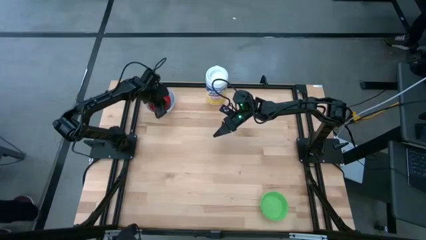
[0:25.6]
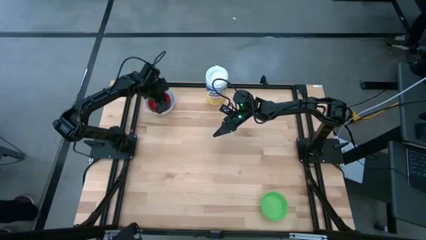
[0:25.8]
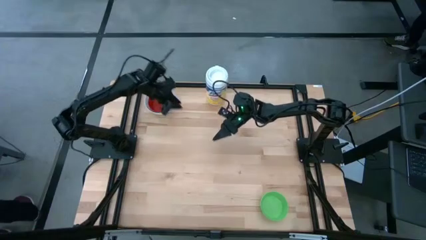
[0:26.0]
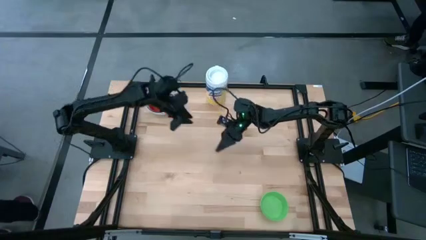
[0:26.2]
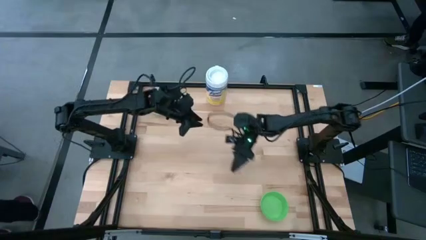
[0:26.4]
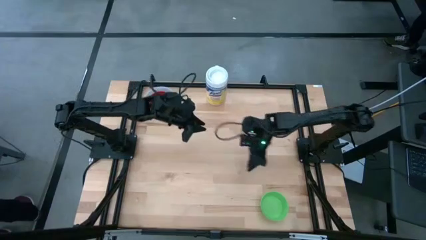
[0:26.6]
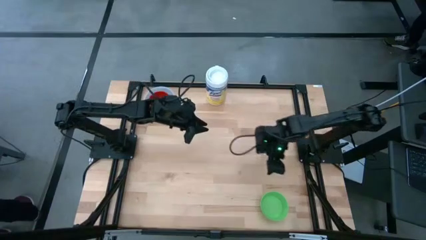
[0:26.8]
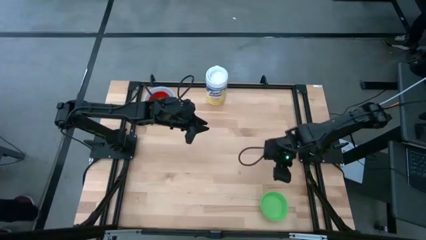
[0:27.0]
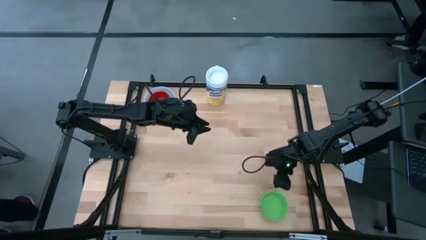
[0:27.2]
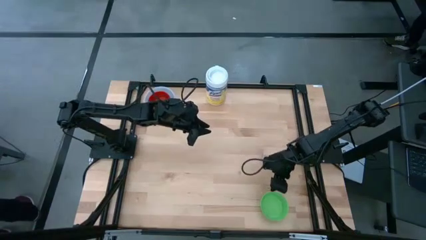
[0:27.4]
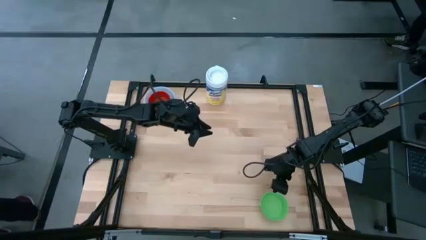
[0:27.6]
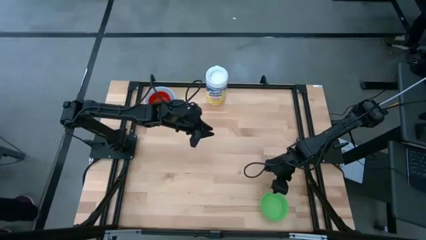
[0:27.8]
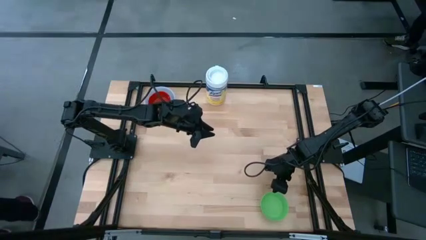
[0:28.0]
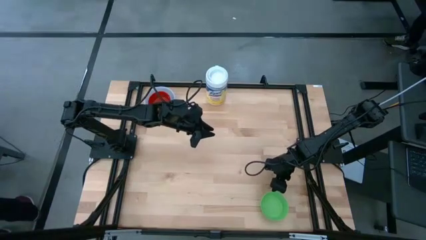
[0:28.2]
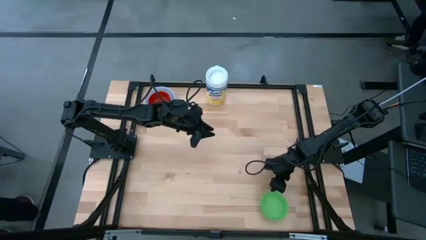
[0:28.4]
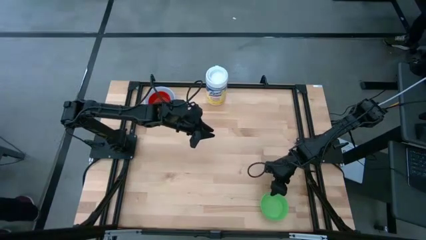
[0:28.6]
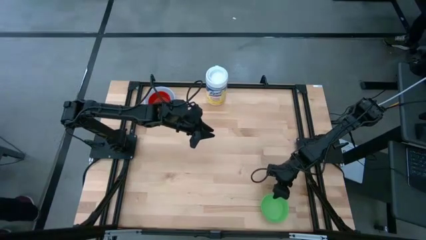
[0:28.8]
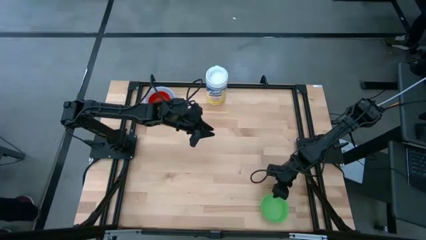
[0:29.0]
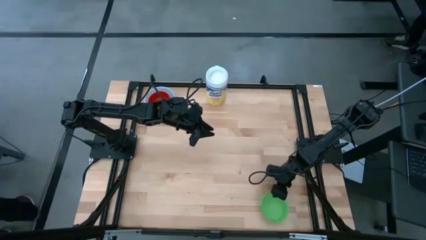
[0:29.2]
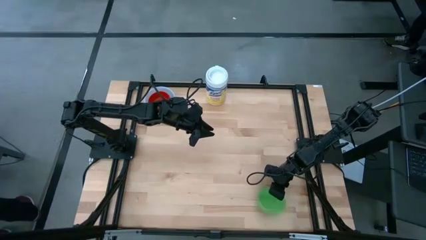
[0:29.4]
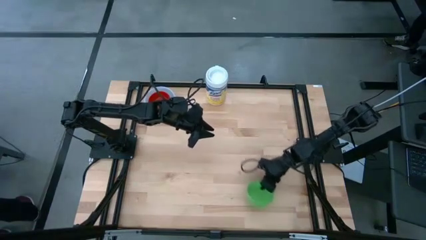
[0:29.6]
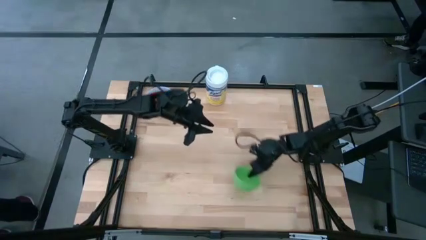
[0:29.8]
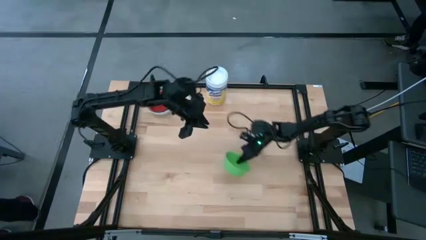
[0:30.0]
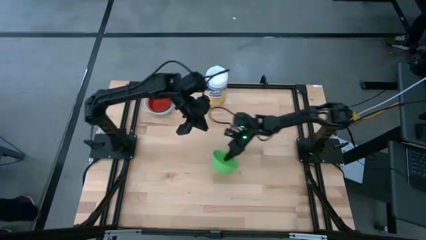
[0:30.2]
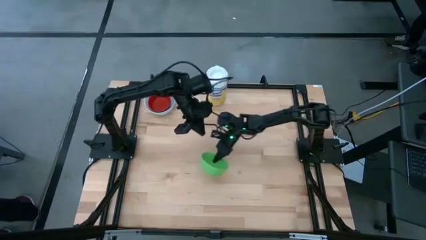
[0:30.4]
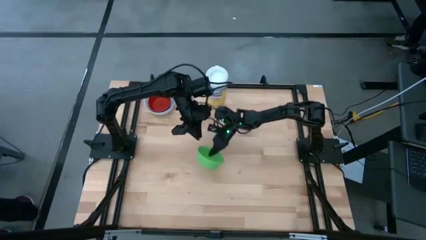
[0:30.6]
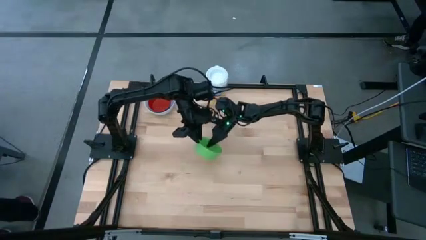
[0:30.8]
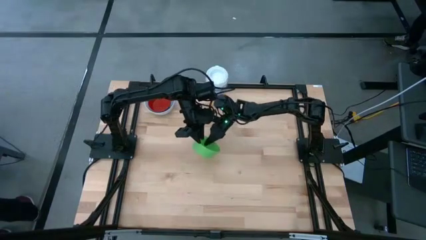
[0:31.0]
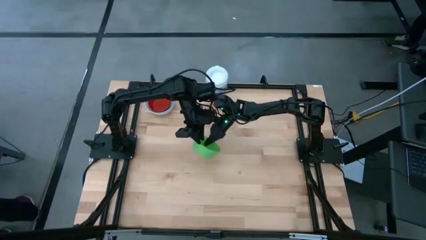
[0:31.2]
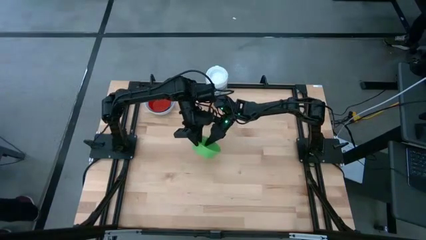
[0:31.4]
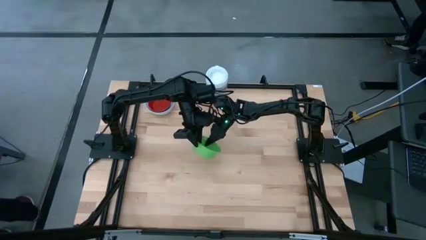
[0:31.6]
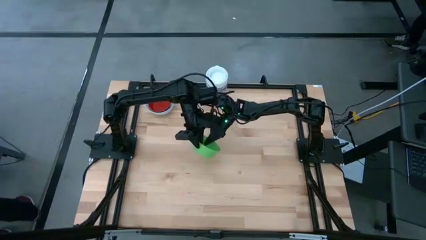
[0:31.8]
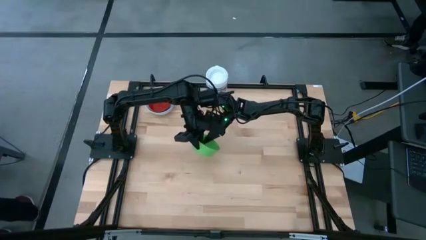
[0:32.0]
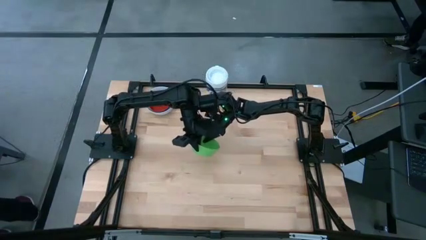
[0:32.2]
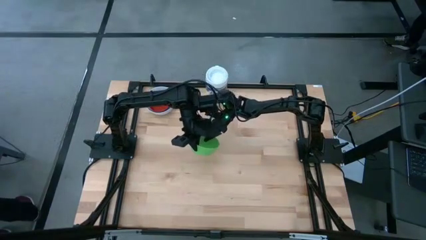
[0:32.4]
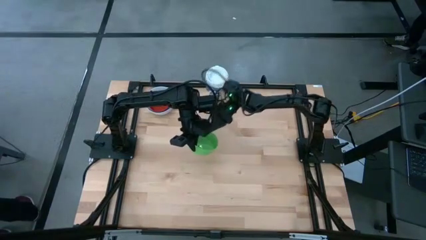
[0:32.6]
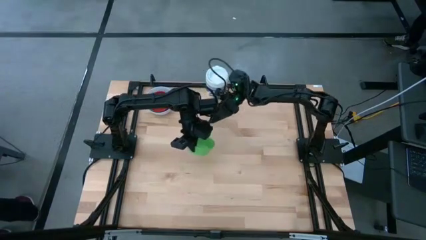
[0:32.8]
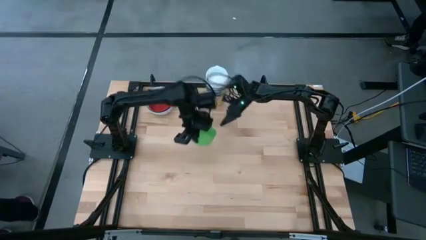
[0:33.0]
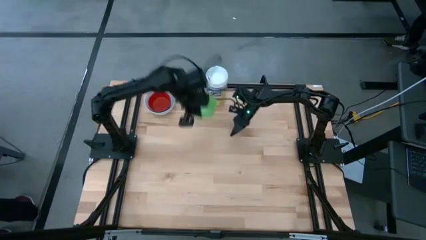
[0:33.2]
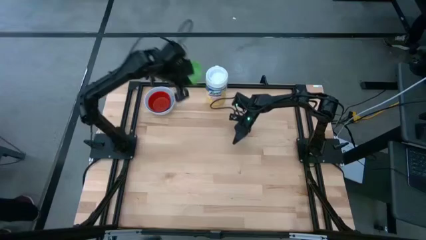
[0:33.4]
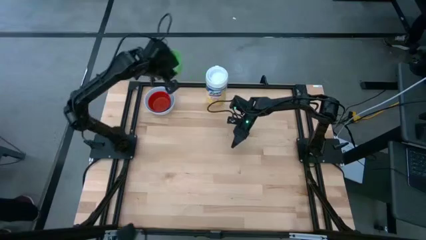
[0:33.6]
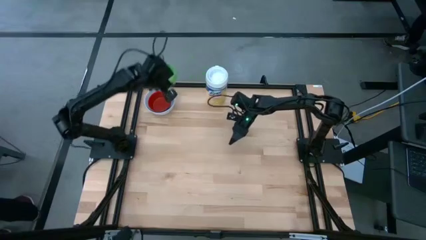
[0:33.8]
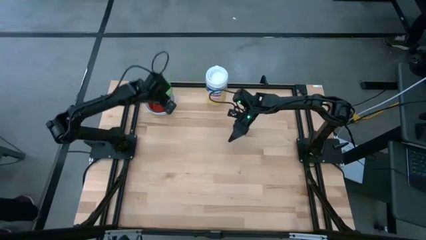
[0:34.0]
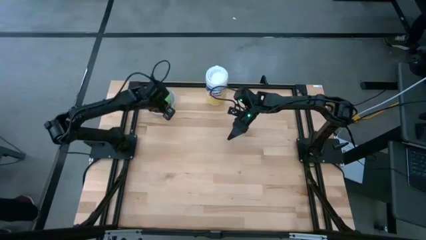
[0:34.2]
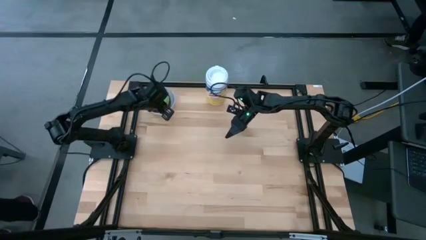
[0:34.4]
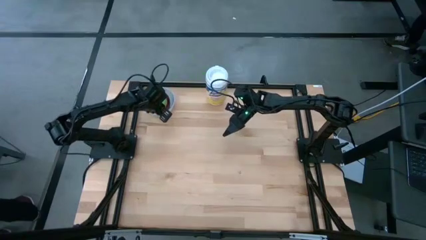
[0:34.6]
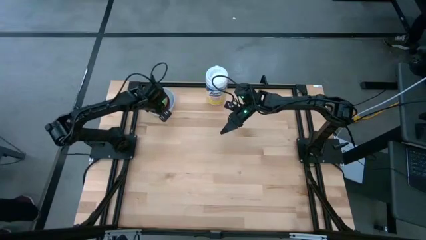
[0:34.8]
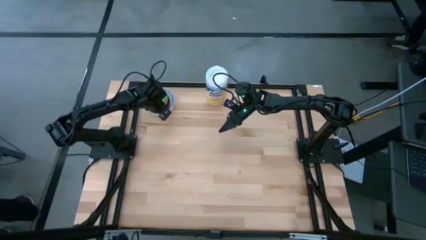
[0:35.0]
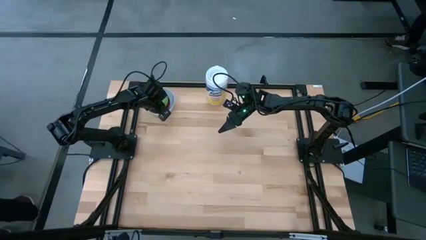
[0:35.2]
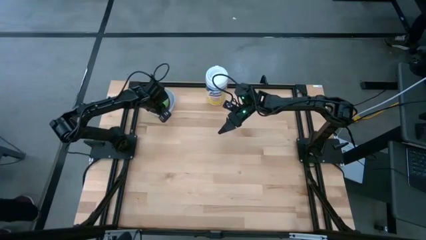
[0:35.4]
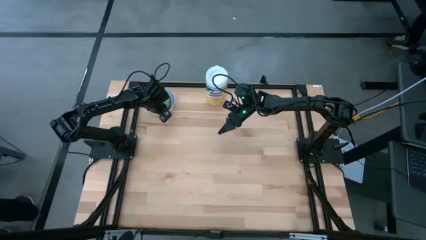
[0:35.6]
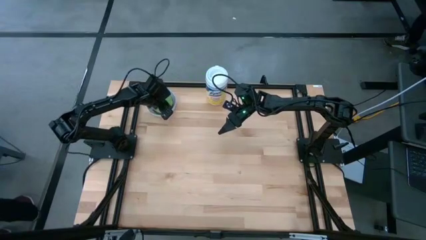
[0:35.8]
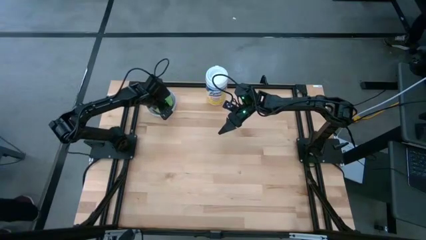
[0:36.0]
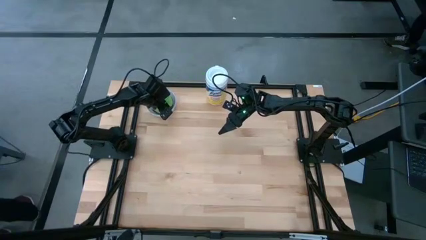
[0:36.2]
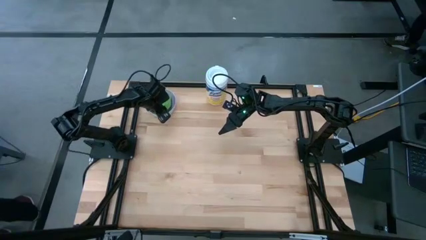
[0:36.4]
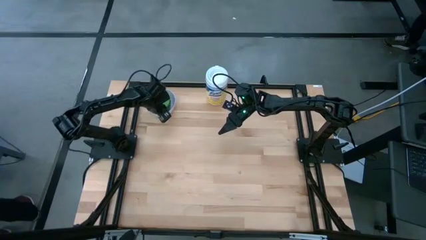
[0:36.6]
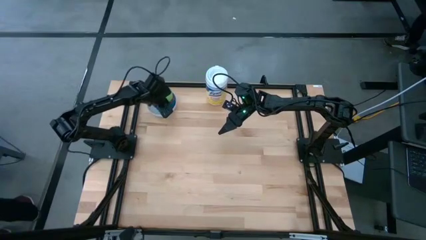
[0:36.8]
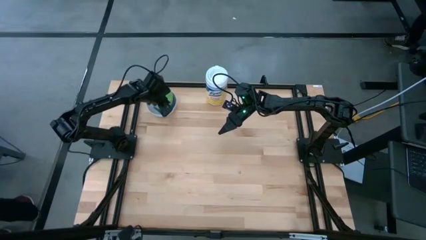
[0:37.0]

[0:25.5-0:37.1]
Stack the green bowl on top of the red bowl

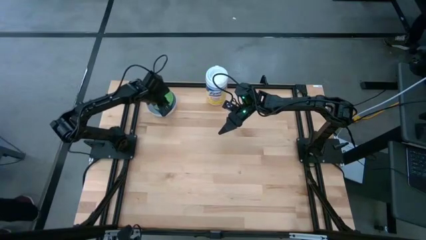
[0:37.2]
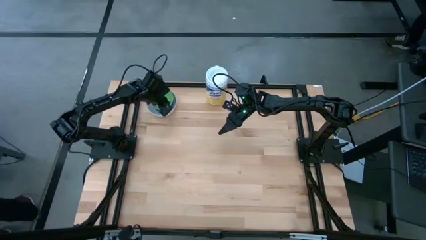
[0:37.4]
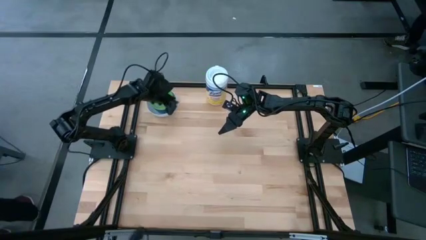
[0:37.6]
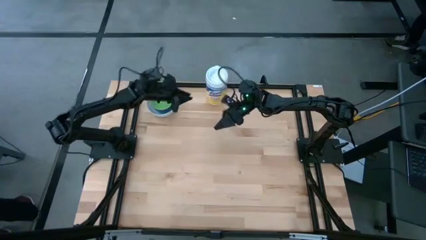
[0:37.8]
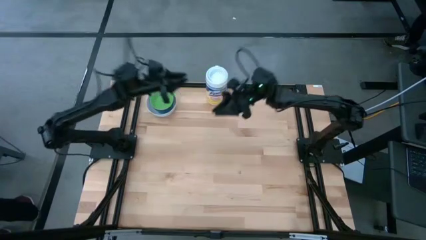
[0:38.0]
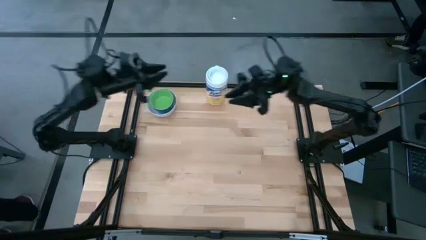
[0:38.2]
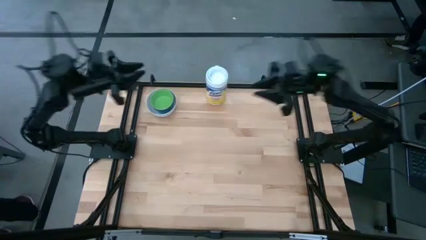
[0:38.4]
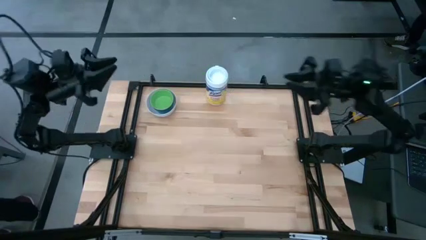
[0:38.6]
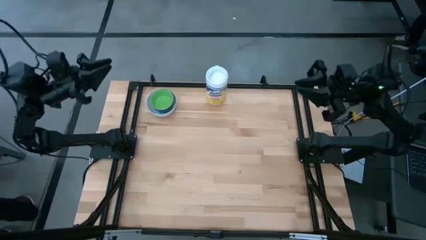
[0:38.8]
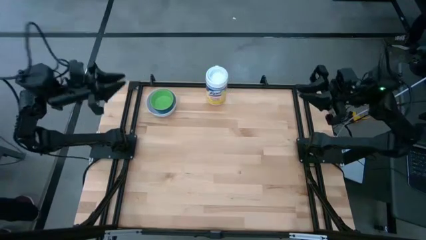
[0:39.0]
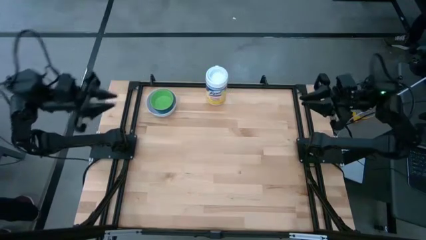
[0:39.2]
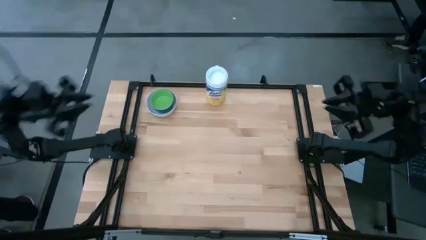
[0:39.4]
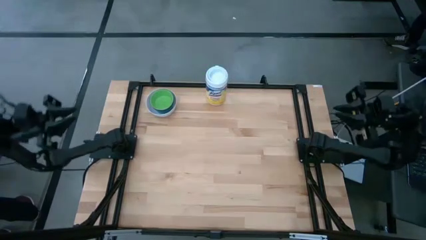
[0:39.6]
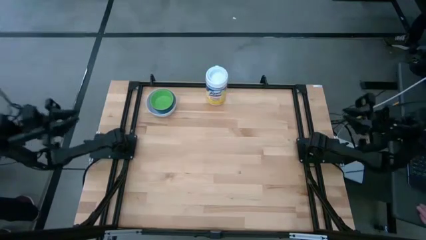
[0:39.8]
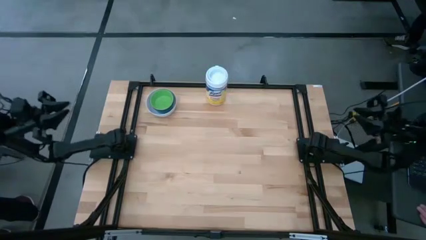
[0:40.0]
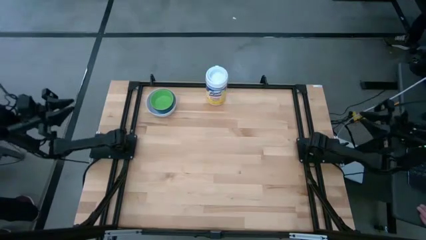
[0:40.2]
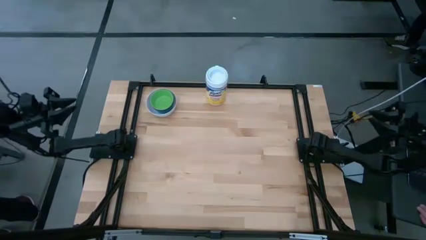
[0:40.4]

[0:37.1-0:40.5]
Return to Home Position
